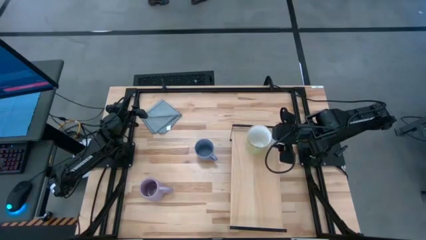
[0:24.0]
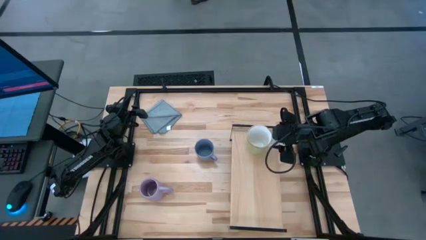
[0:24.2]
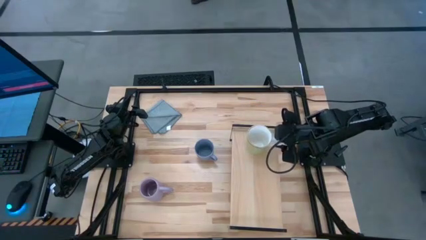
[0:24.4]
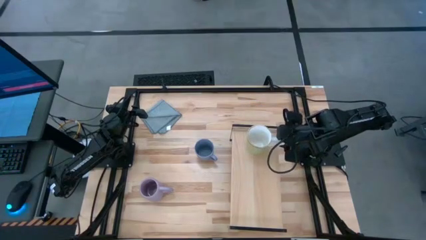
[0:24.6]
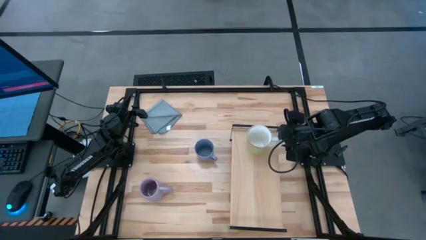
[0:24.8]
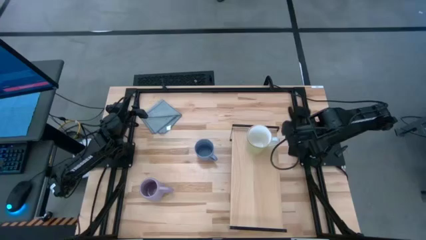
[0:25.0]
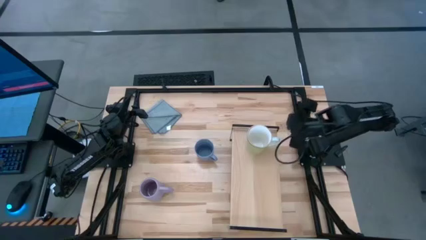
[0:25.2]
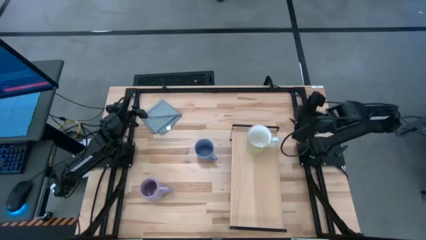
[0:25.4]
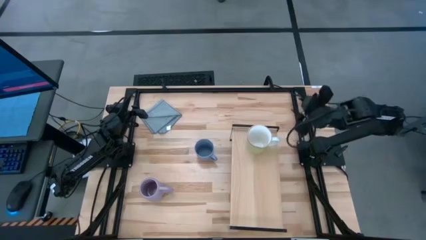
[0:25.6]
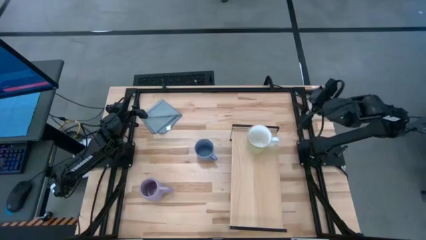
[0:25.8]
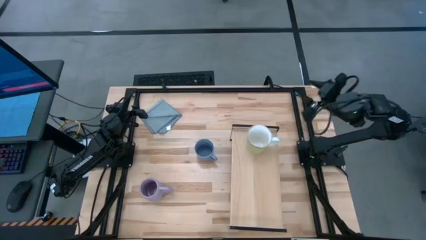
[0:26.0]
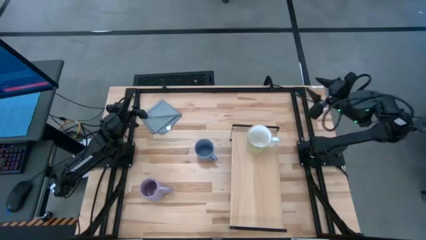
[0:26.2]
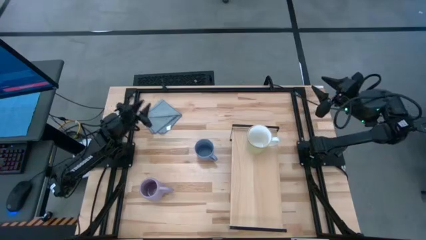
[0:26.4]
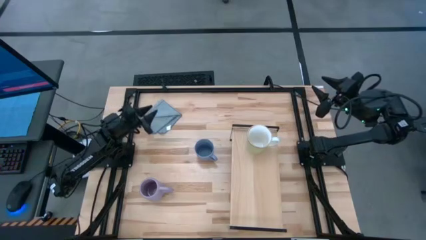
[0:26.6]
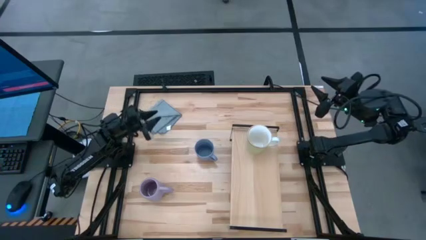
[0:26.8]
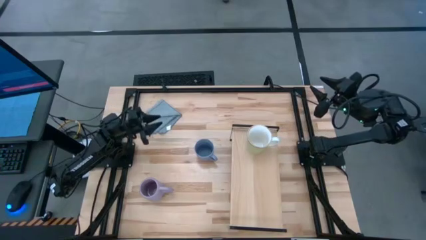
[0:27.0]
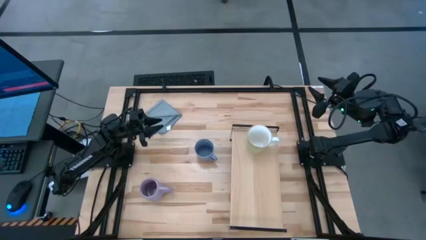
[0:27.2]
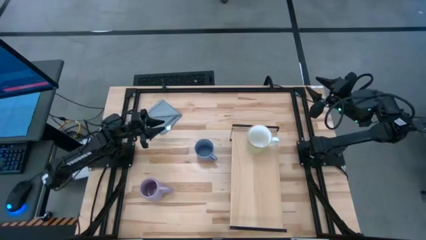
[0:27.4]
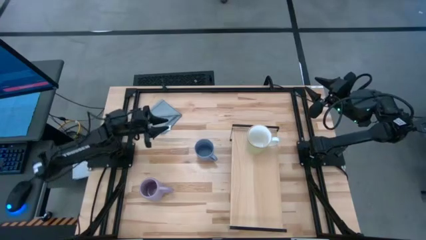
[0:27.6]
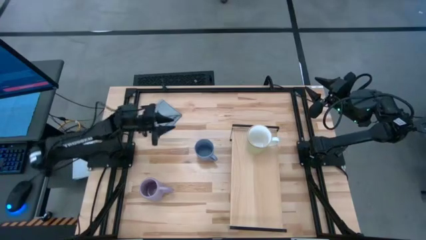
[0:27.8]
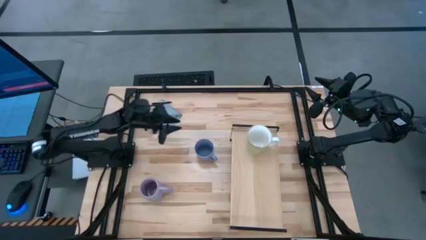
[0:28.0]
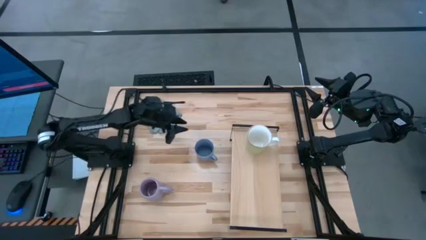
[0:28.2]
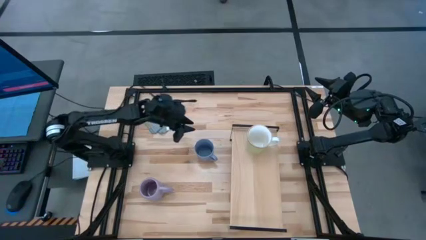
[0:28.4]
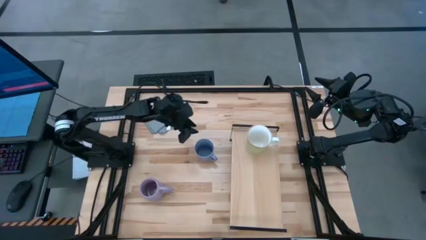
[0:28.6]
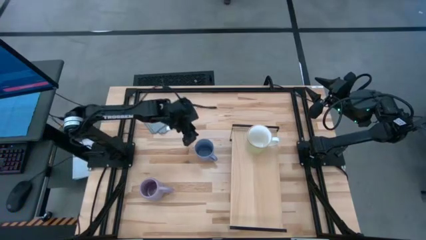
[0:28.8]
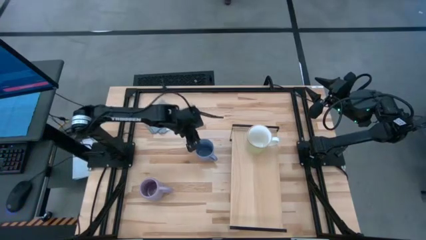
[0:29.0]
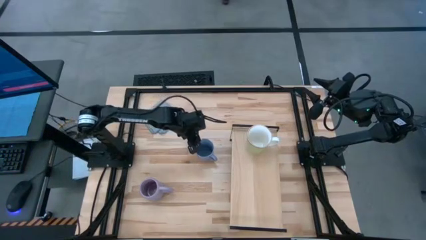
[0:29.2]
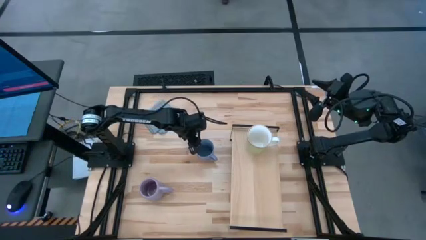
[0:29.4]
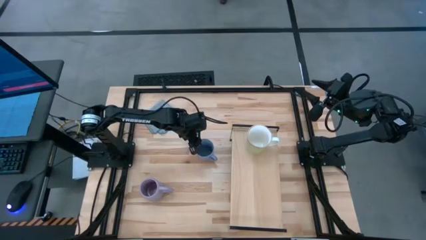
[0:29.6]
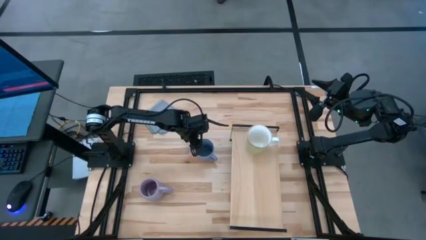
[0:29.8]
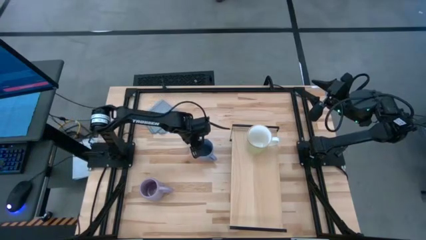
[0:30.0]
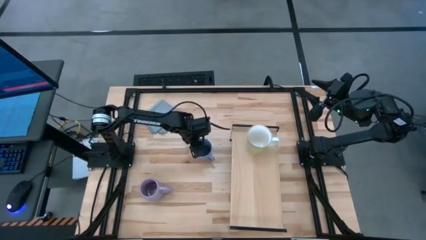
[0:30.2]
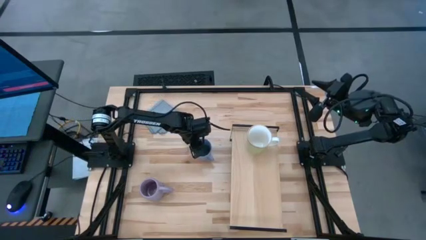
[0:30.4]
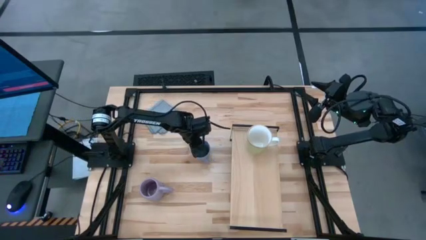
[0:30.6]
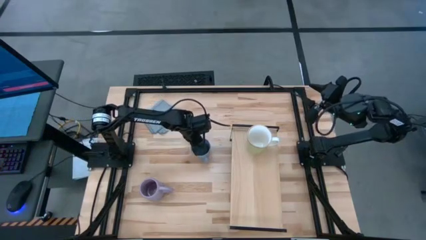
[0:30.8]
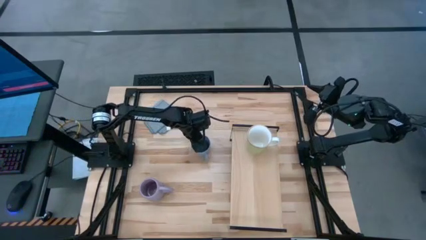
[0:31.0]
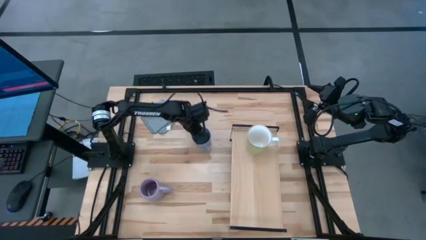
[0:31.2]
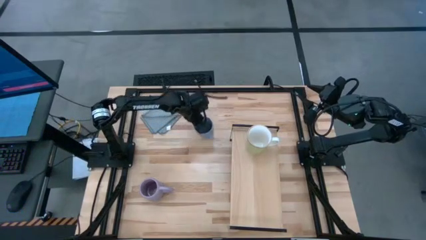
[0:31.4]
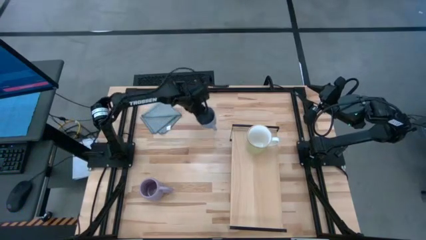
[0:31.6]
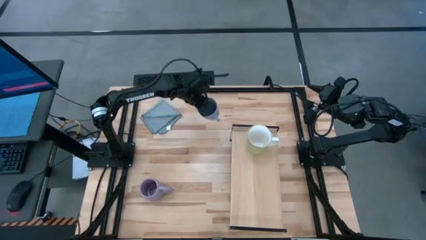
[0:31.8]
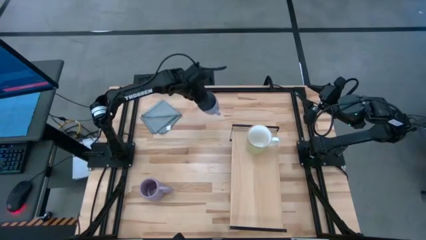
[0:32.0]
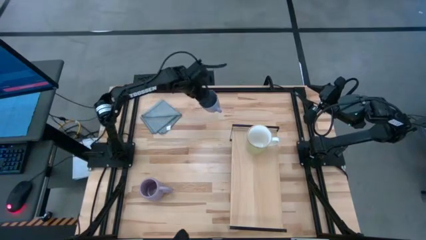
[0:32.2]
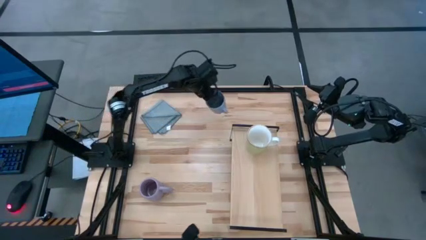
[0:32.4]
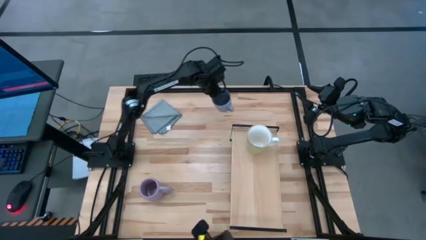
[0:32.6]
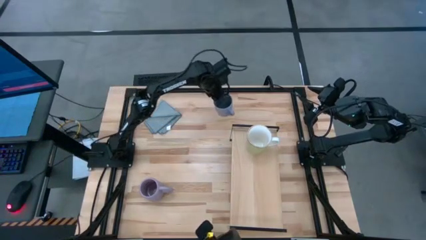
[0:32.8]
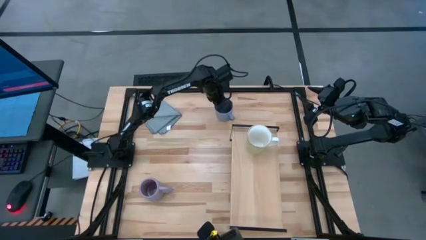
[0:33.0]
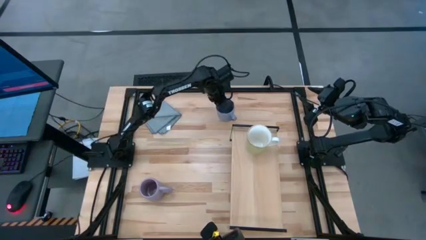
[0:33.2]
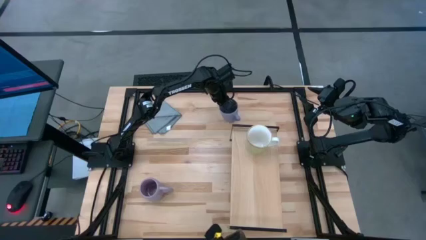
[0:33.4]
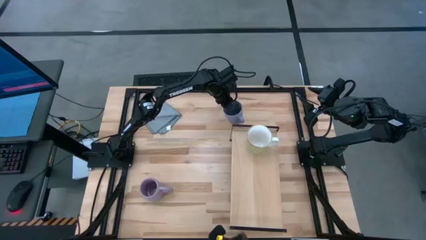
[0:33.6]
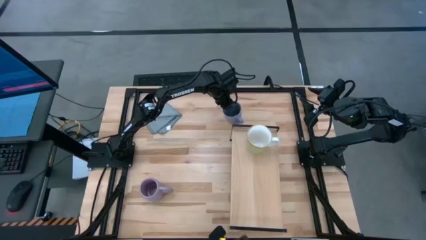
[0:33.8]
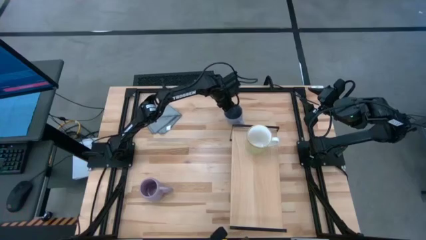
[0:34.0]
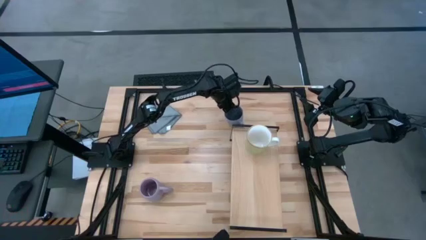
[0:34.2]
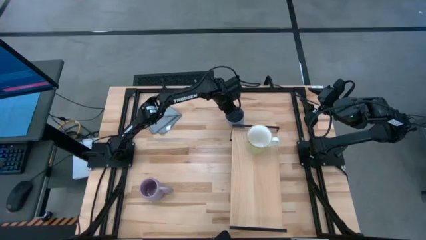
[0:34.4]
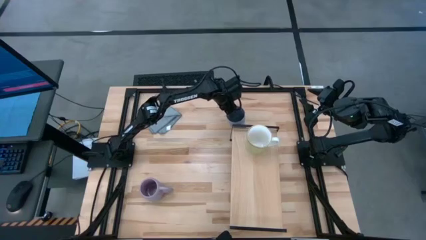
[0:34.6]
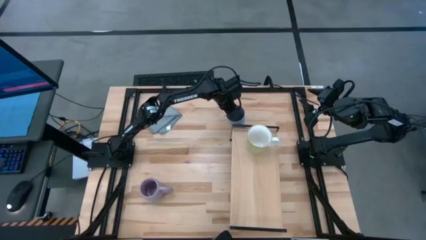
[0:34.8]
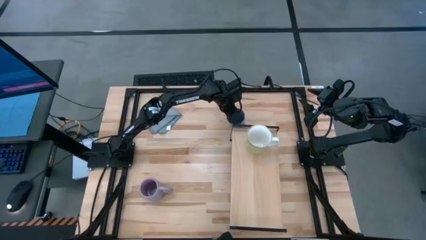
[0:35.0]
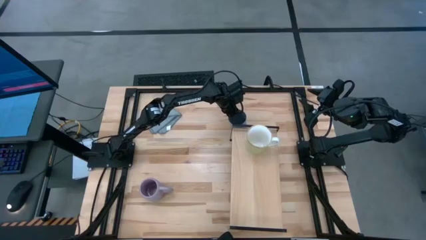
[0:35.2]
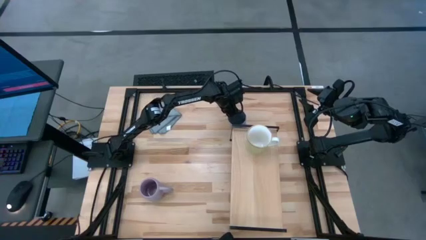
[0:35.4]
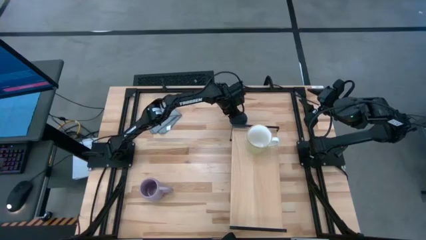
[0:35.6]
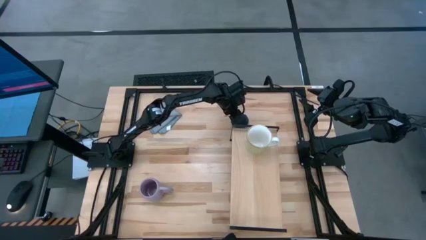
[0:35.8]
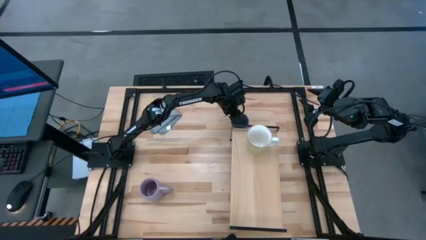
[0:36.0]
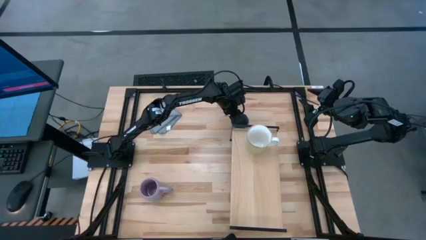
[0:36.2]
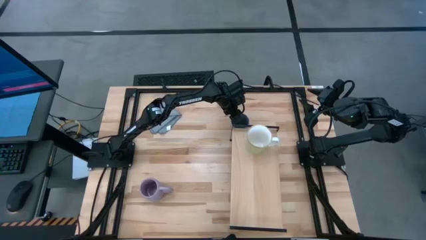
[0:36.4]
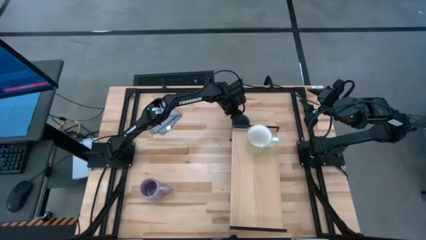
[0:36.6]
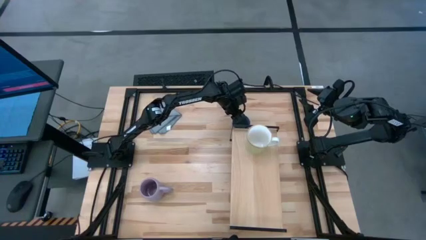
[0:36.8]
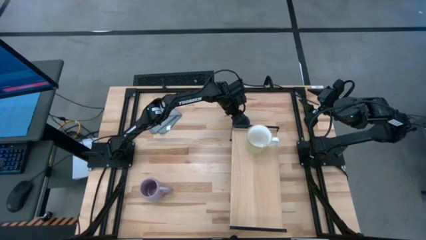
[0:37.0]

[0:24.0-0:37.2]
Task: Stack small to large cups/mugs on shelf
Move the blue mug on the shelf

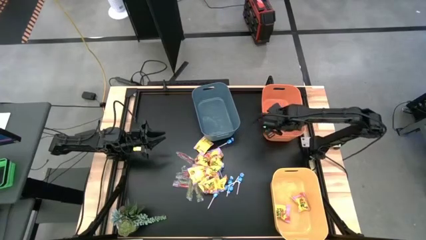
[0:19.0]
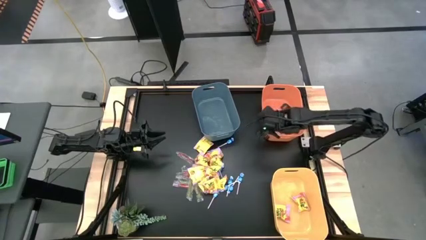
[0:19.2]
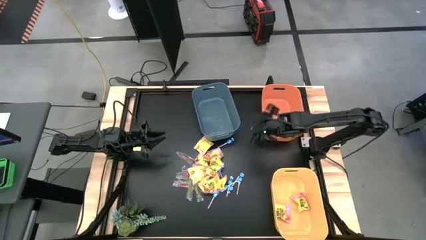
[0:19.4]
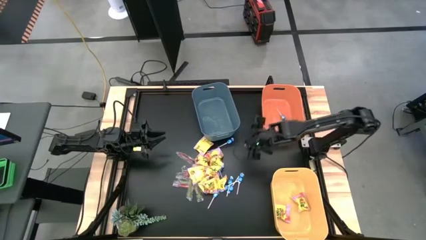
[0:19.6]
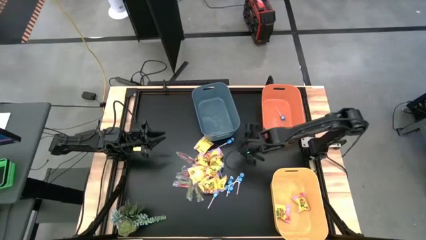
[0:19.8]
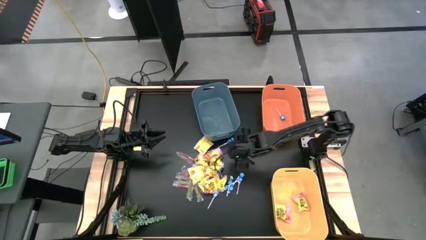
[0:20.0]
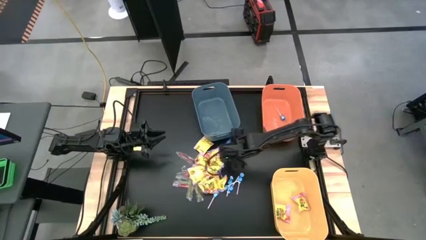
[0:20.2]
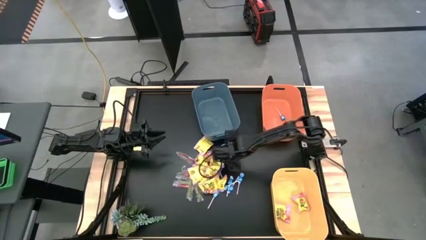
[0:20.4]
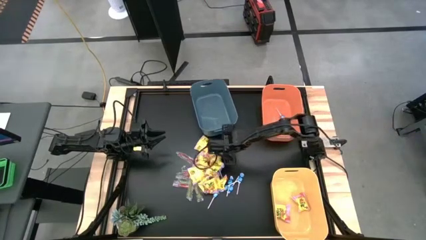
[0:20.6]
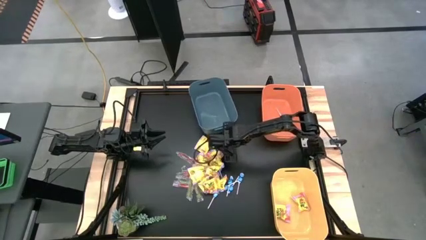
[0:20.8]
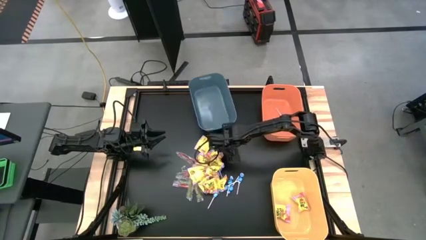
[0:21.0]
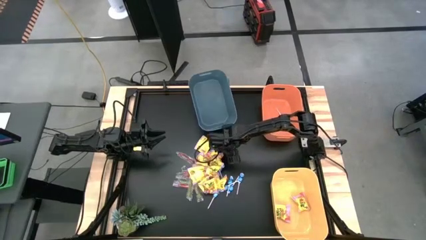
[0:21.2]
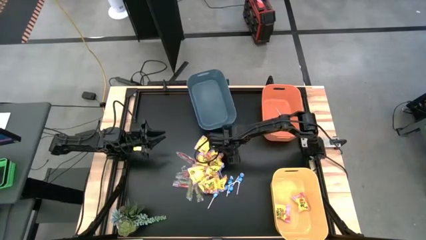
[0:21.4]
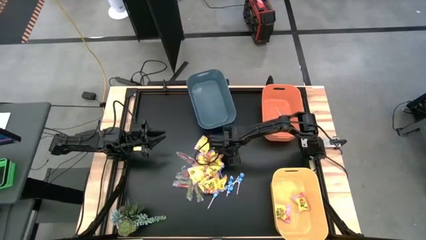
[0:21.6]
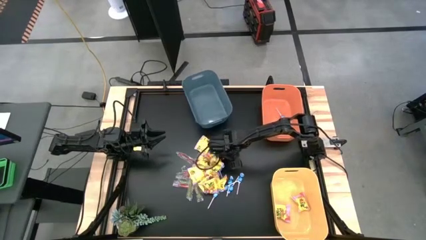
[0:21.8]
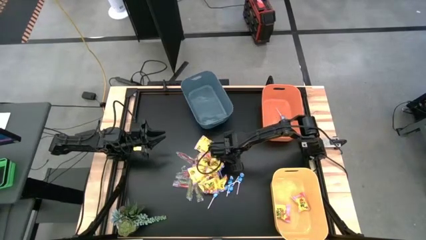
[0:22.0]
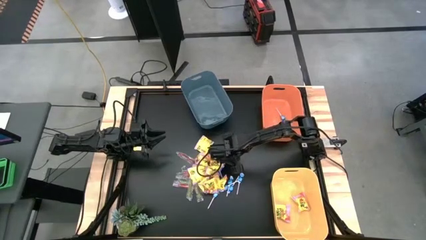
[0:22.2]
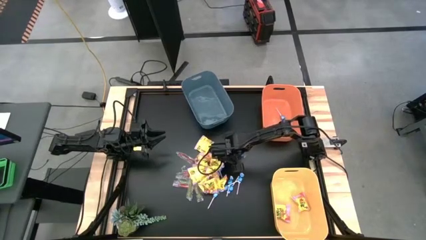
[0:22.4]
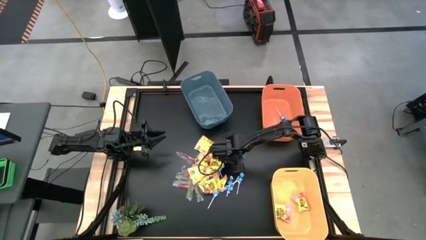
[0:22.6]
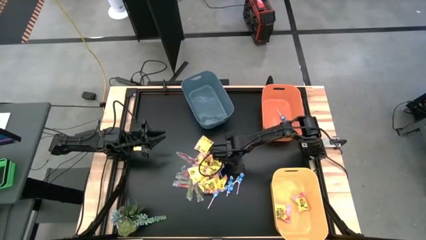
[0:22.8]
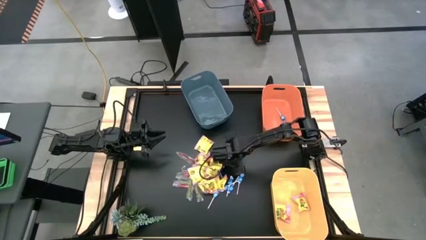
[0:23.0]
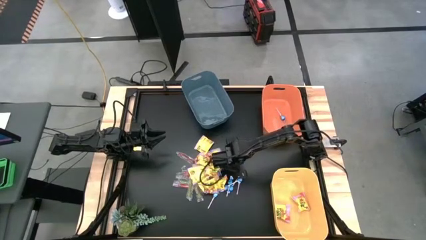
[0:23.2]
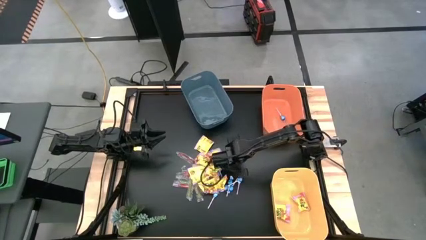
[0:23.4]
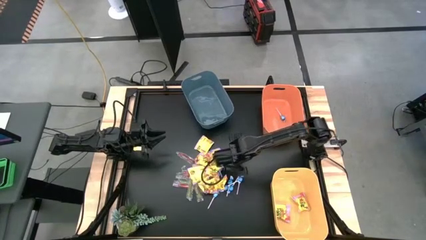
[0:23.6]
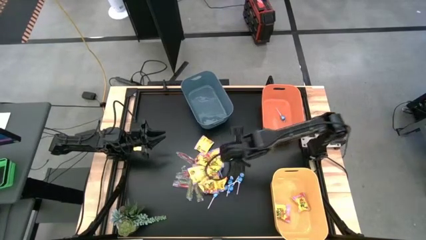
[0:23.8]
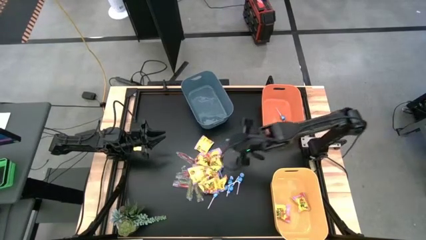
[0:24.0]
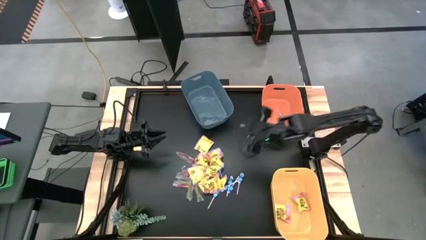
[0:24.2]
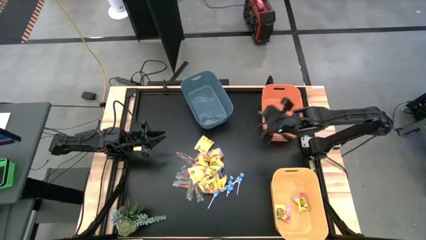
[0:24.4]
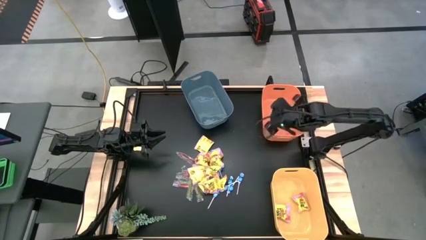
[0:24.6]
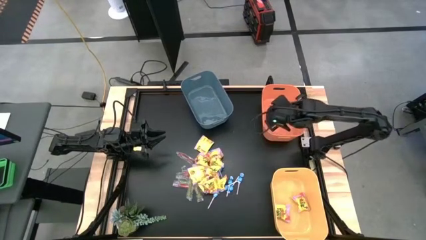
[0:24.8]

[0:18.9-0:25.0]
Task: Sort candy
Put the blue candy into the orange bin
